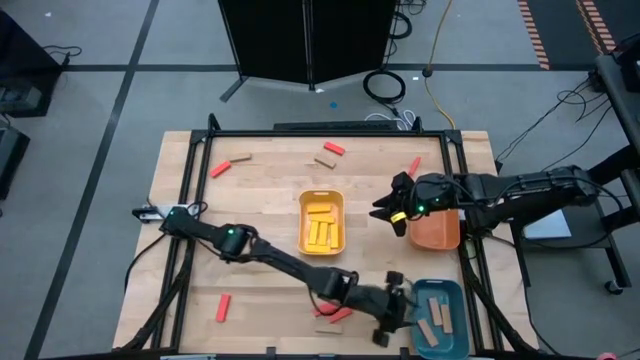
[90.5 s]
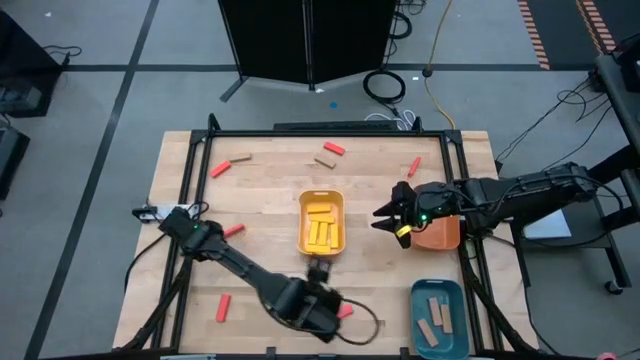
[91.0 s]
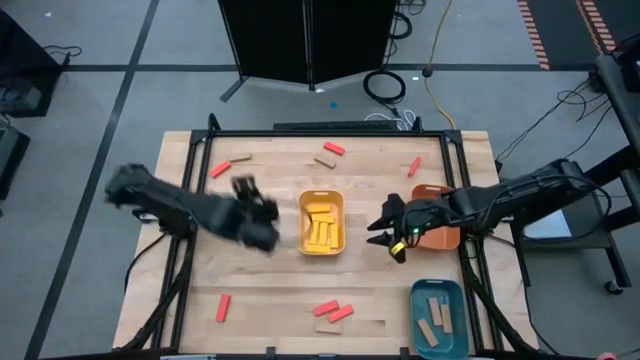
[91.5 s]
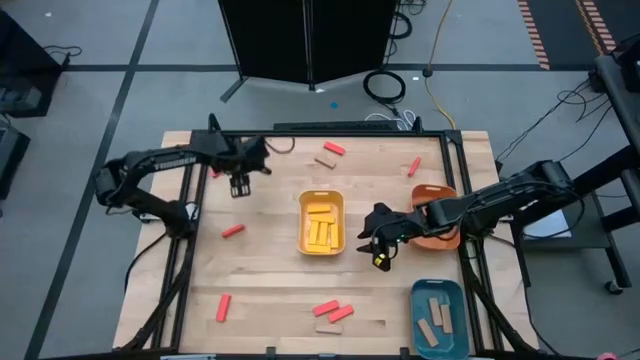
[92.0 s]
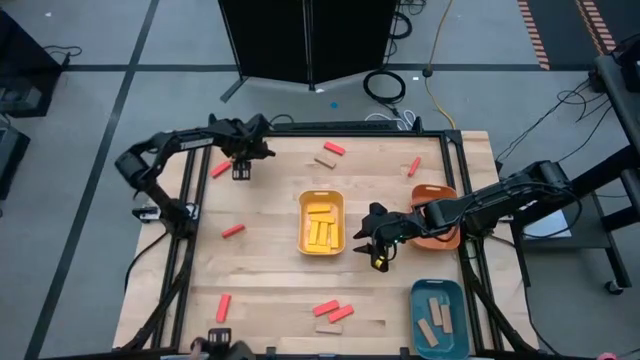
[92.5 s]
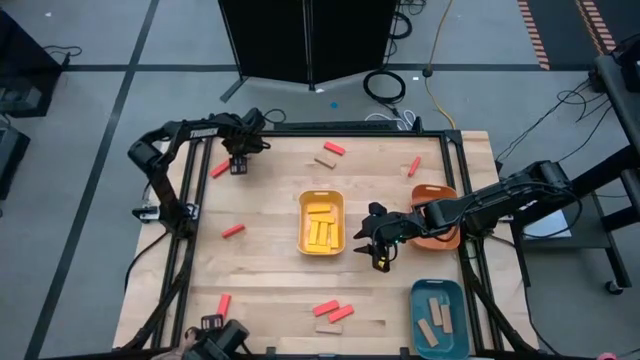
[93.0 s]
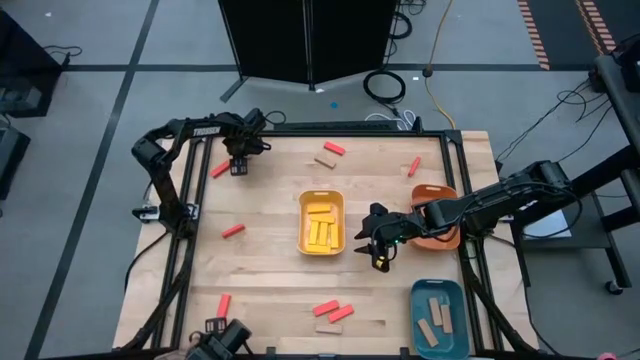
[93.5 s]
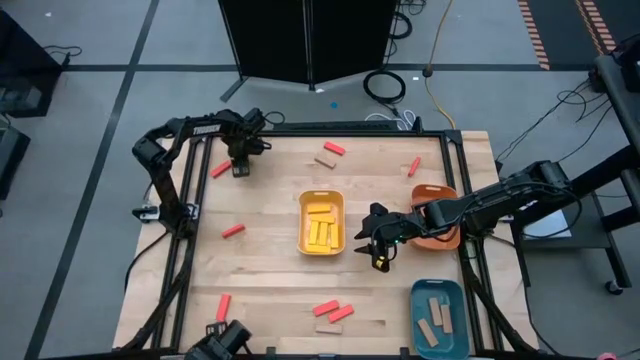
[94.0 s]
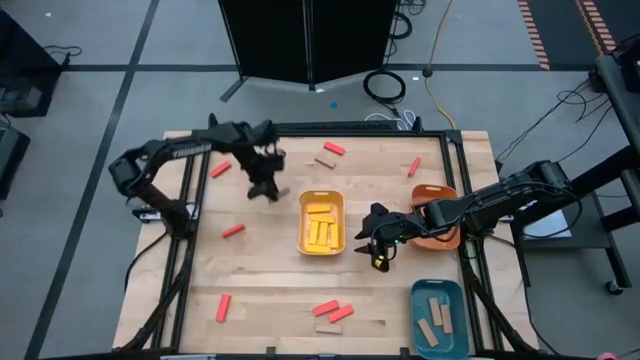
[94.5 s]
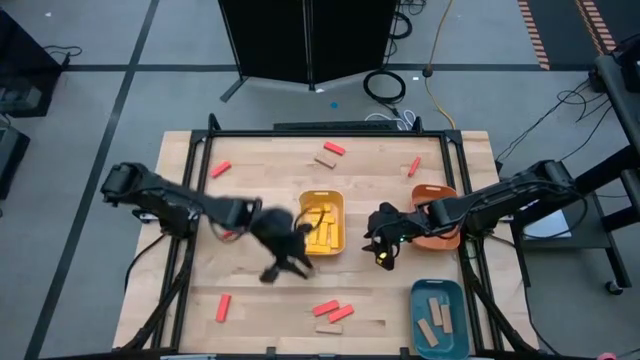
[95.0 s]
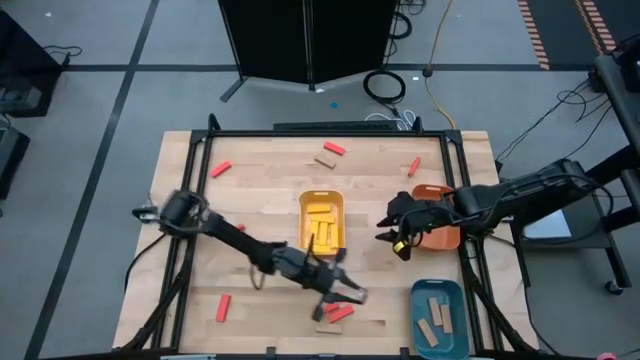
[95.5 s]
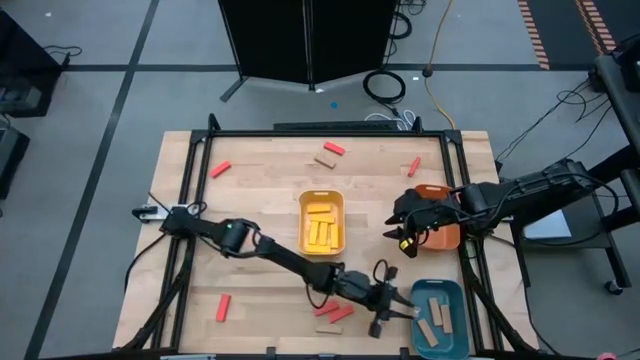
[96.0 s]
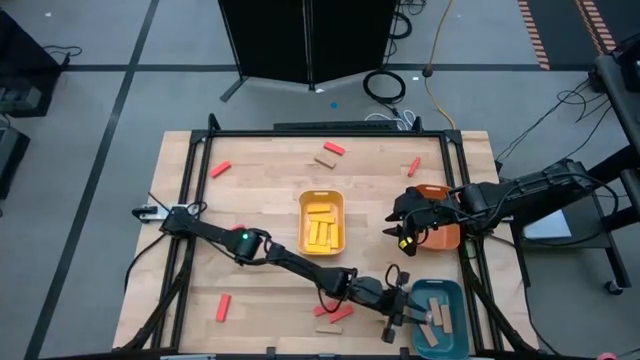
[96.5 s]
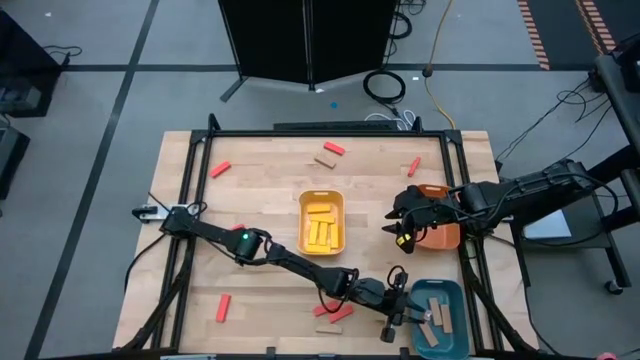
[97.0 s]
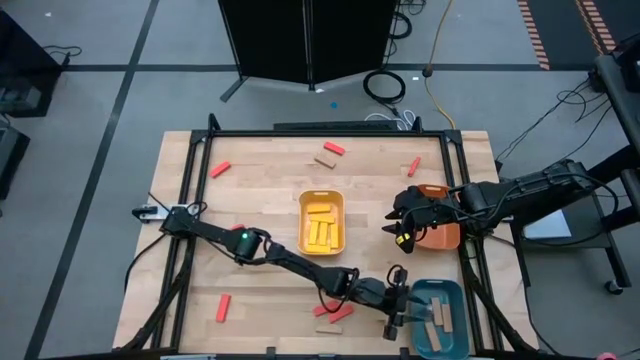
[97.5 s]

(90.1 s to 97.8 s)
Task: Sort blocks
Put the brown wooden block into the blue bin

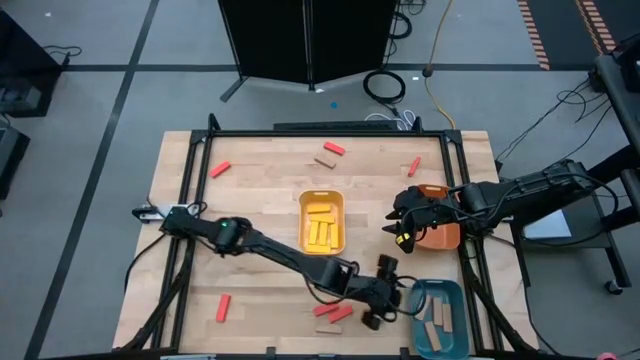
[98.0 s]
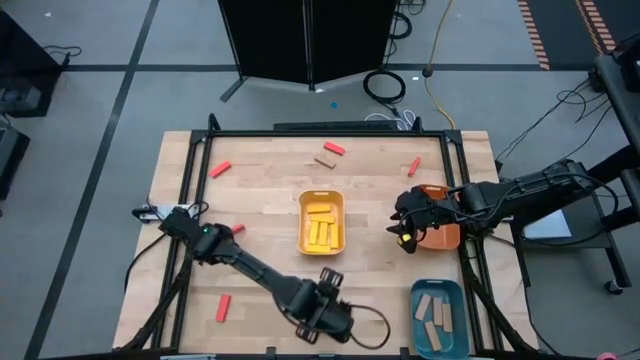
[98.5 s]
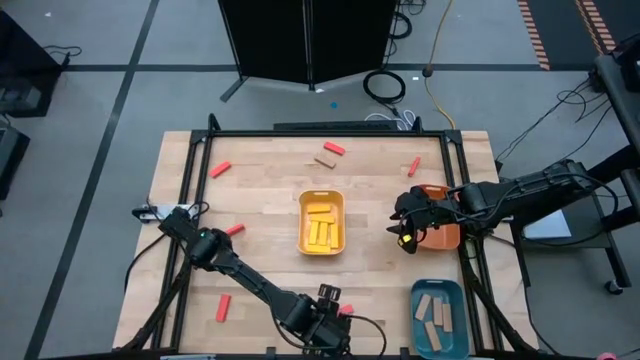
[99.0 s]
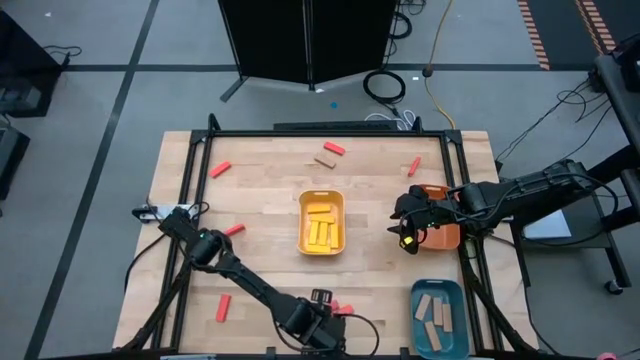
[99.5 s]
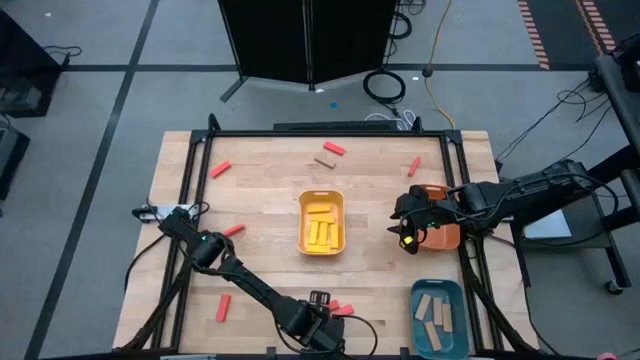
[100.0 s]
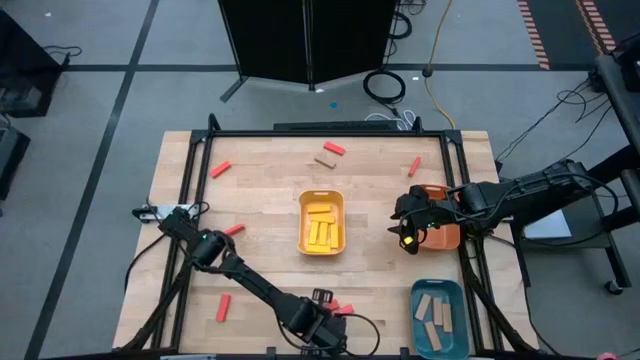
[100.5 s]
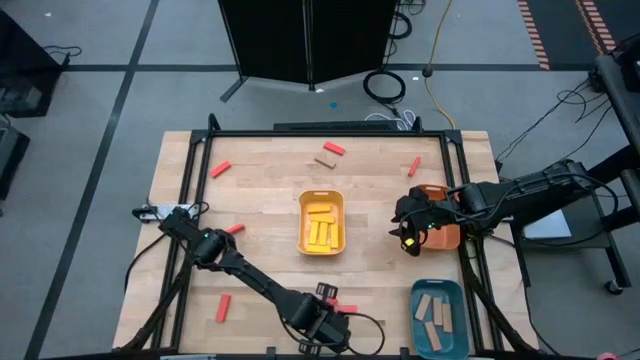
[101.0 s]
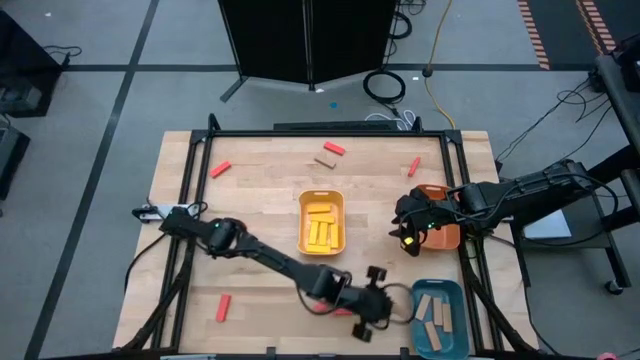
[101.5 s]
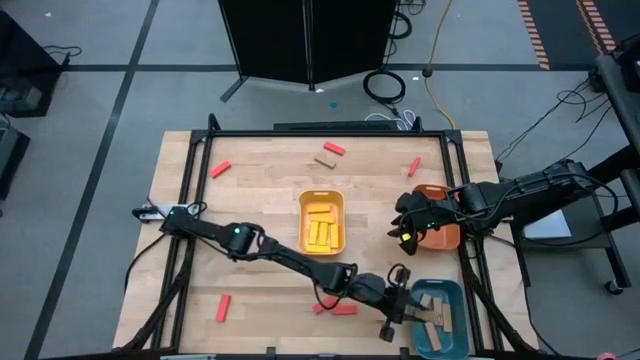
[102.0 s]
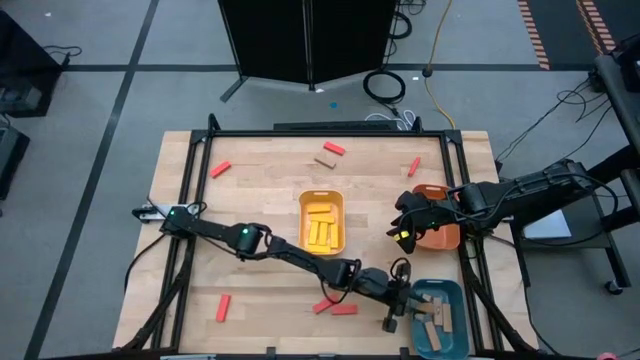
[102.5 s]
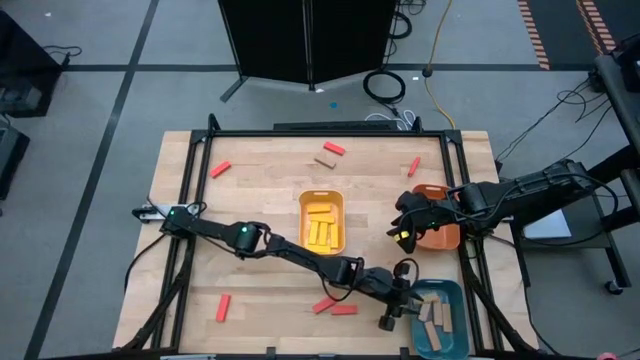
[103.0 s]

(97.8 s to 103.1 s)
Put the brown wooden block into the blue bin

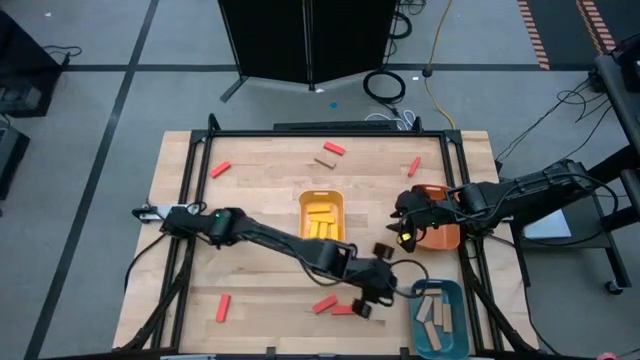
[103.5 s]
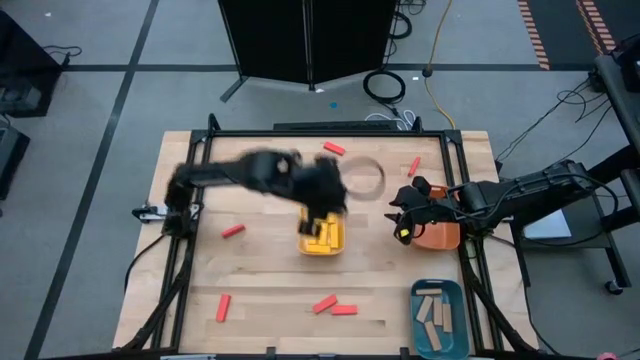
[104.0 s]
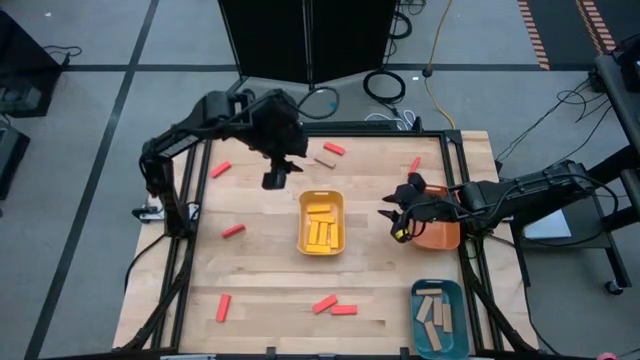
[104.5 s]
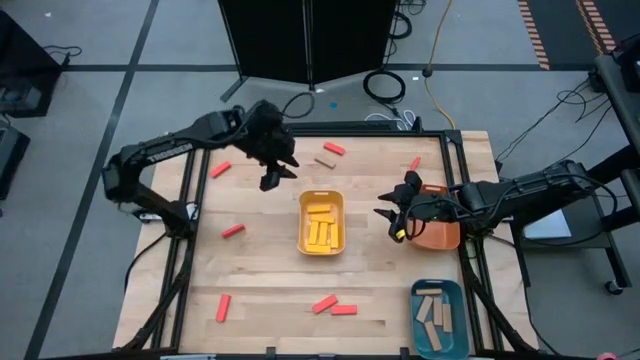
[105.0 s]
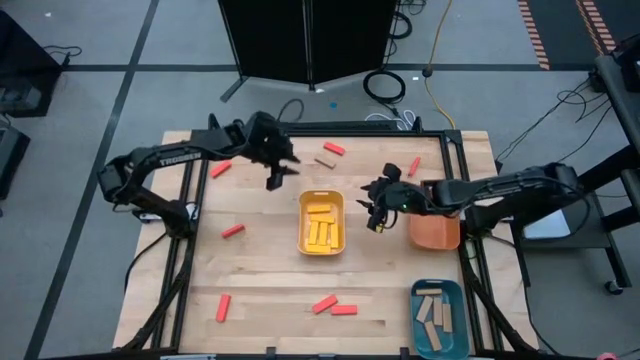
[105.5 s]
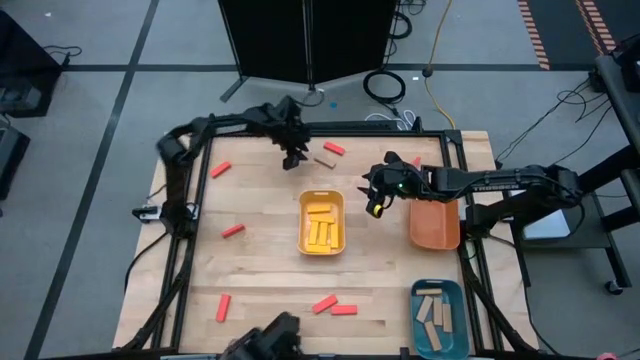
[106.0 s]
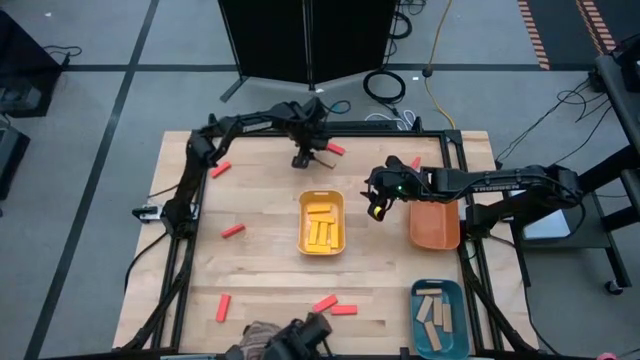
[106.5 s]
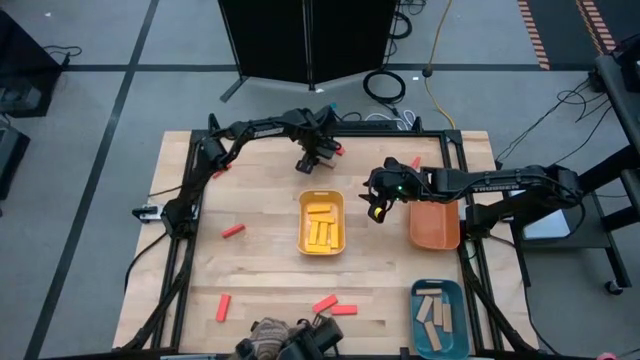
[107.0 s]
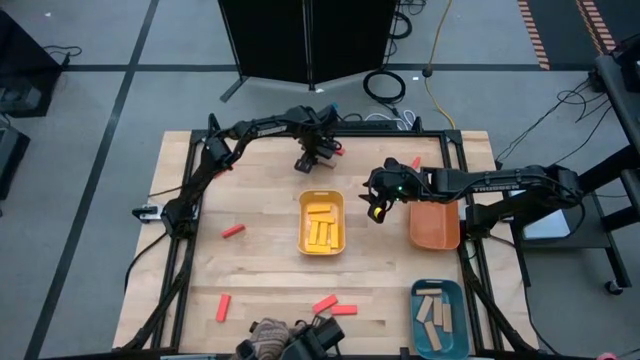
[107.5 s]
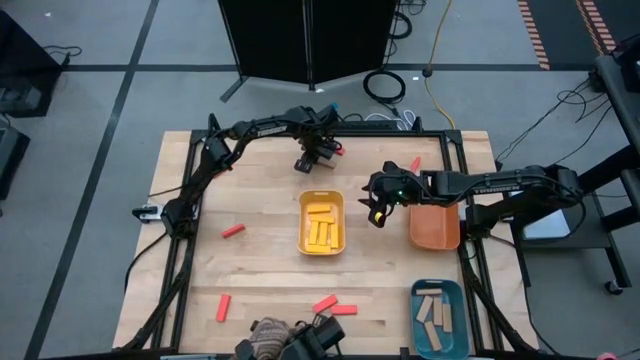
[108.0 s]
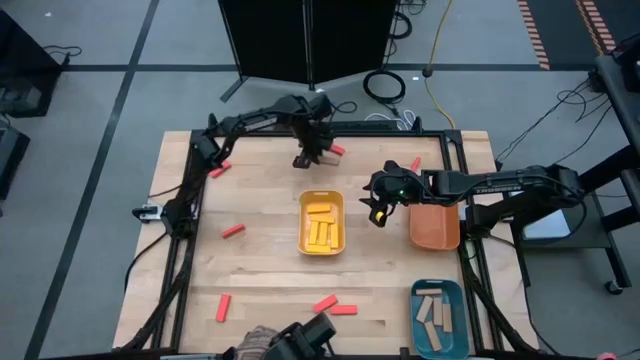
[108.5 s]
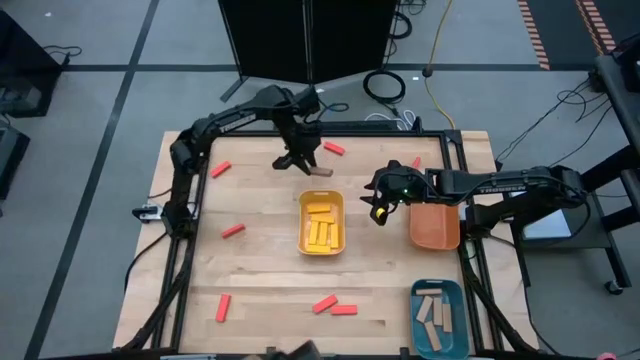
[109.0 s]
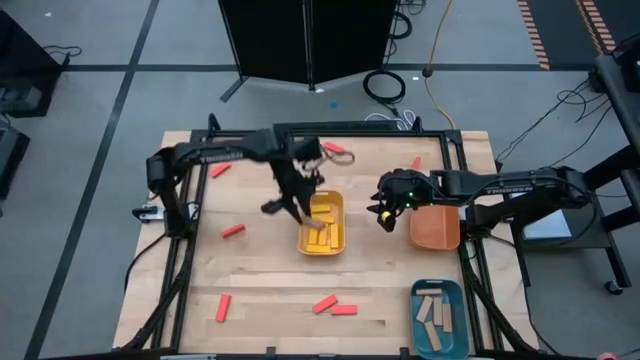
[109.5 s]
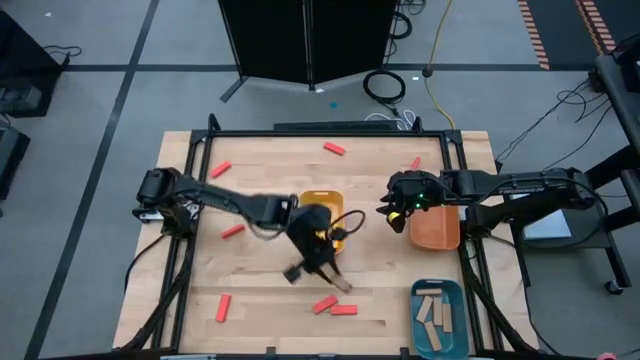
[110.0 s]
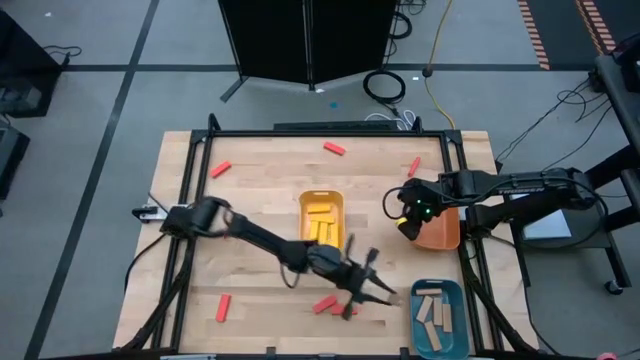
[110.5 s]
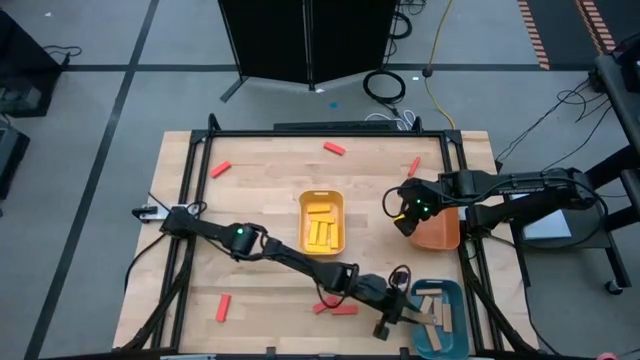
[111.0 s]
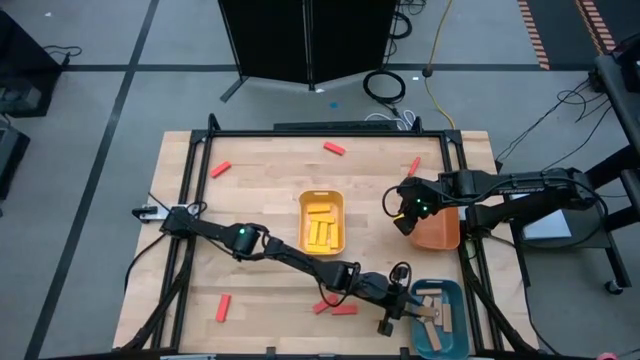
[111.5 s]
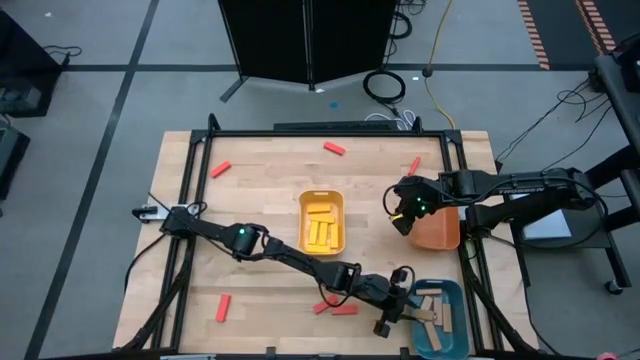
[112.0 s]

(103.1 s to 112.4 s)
Put the brown wooden block into the blue bin

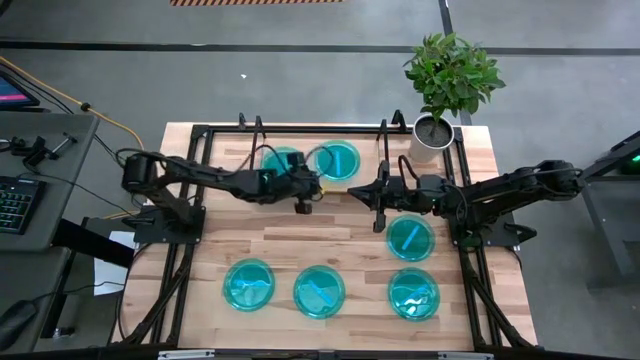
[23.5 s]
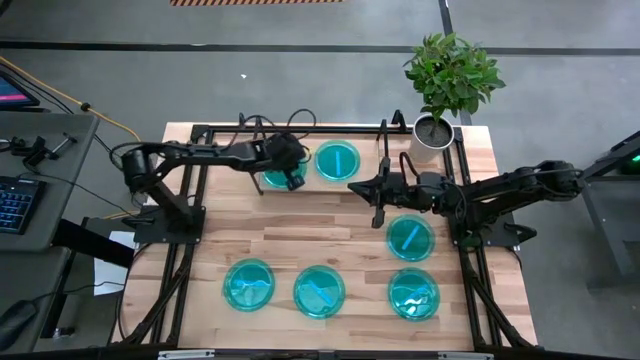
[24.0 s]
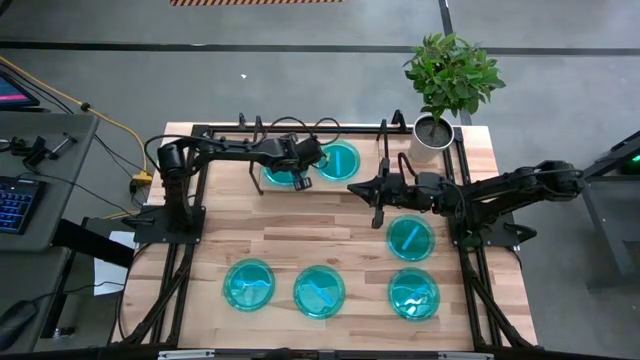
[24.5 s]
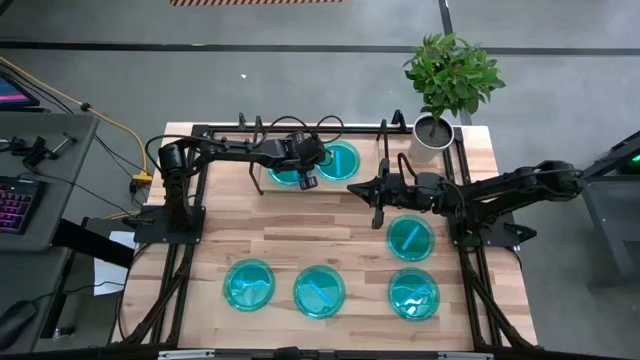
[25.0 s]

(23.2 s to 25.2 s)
Task: Place and stack plates onto a shelf
Adjust the blue plate on the shelf
